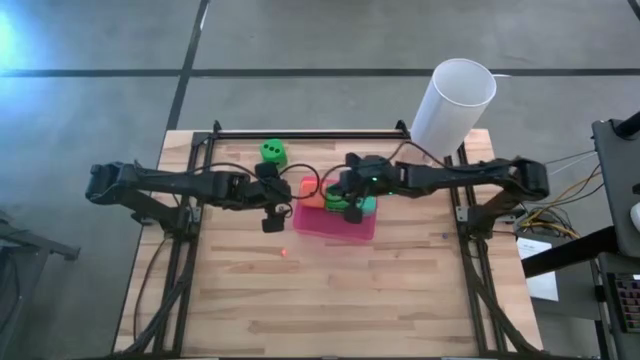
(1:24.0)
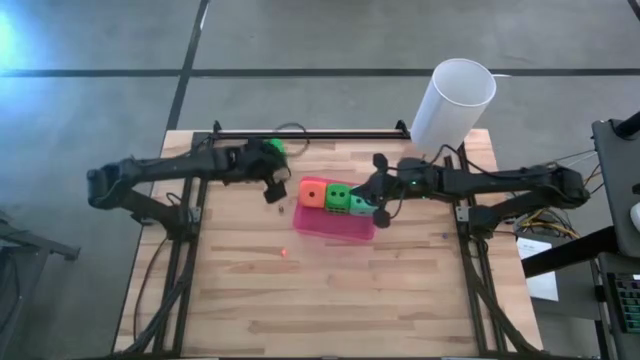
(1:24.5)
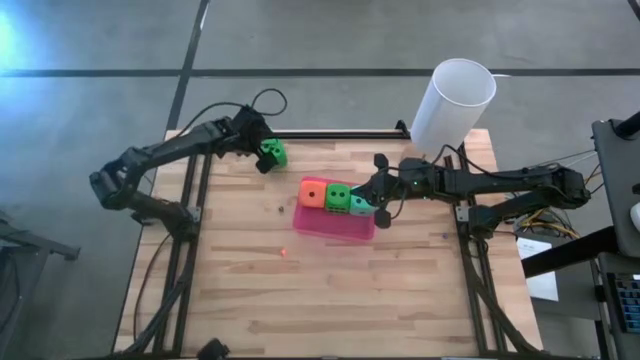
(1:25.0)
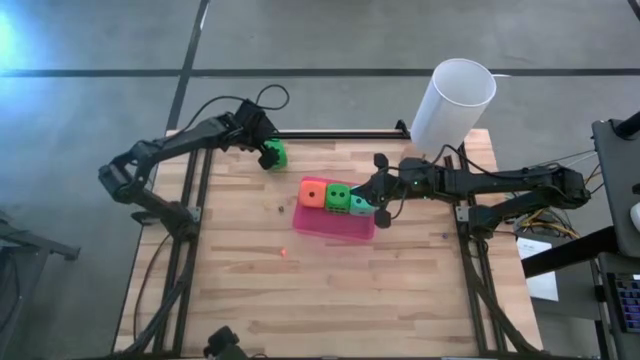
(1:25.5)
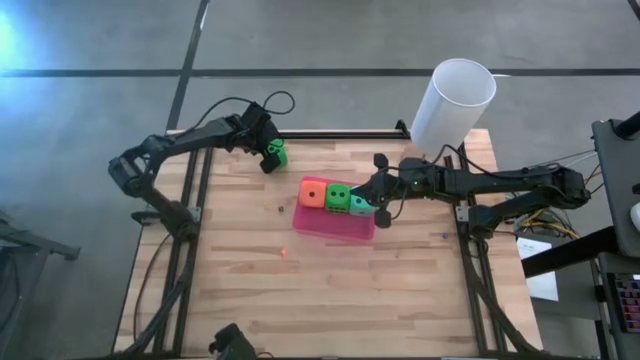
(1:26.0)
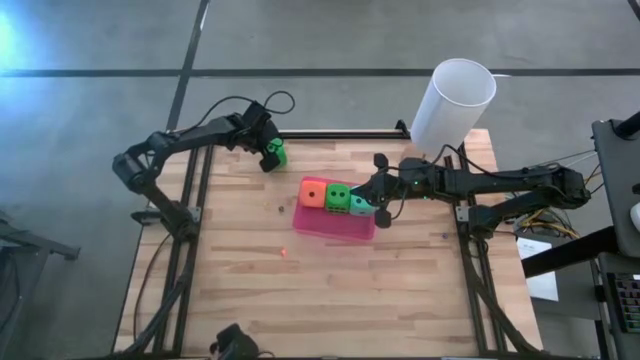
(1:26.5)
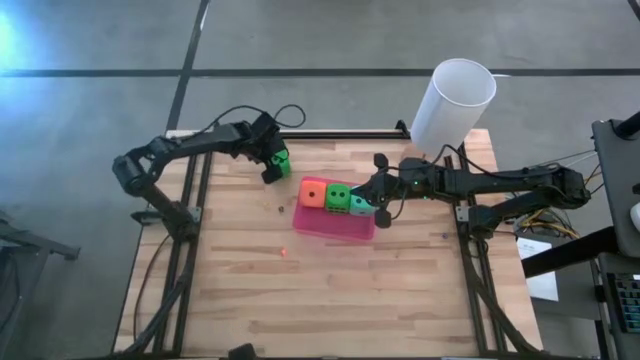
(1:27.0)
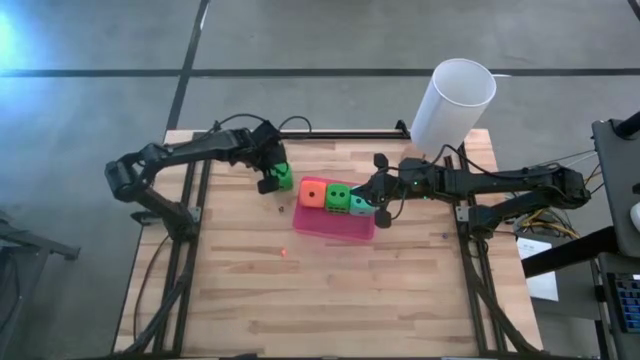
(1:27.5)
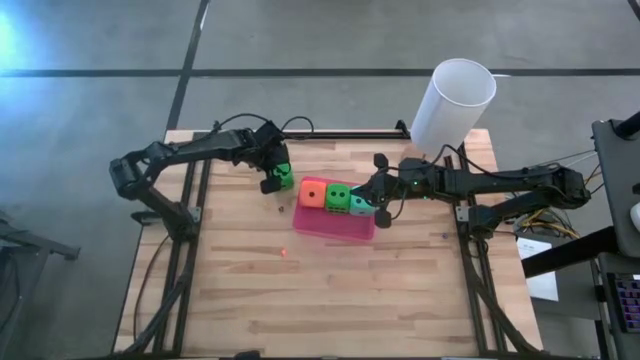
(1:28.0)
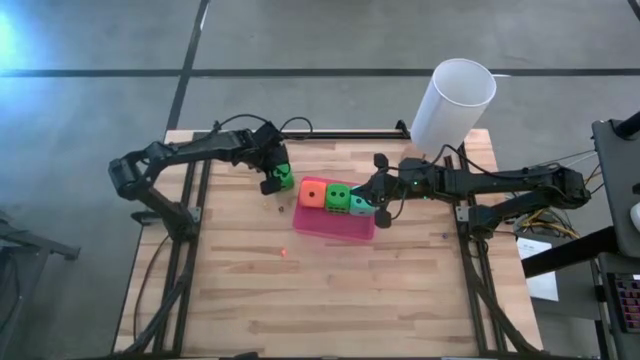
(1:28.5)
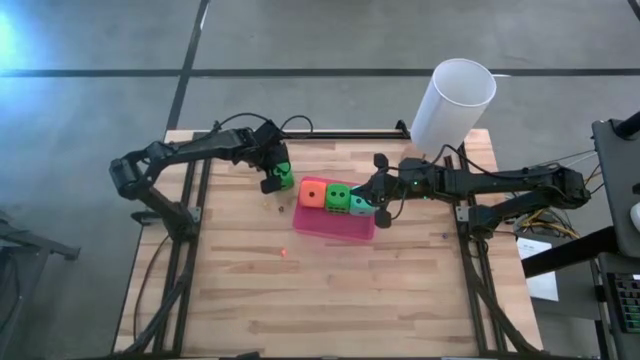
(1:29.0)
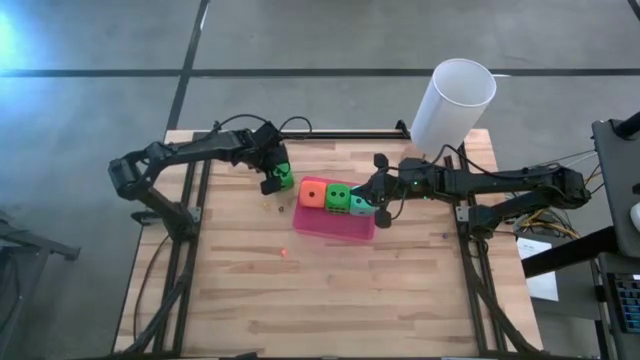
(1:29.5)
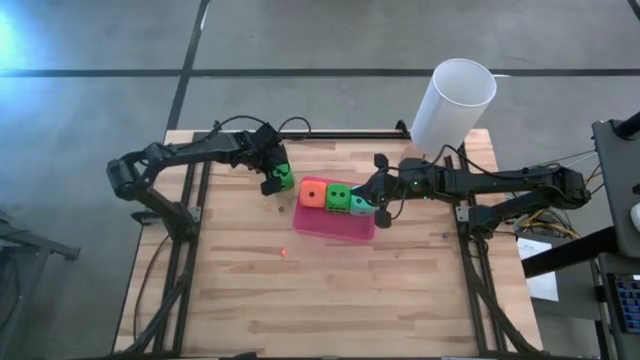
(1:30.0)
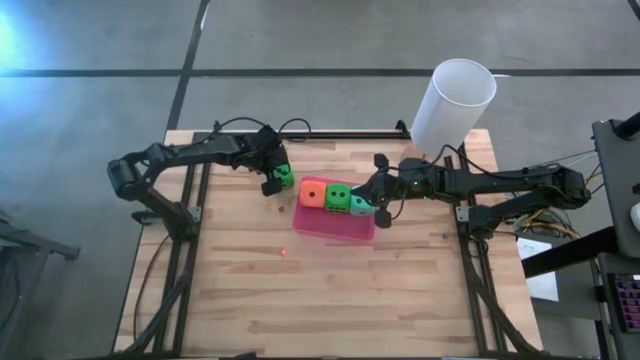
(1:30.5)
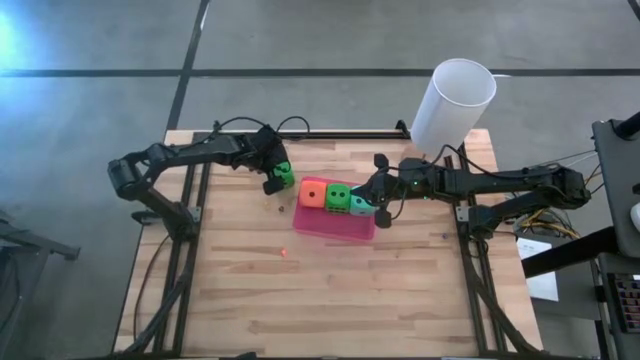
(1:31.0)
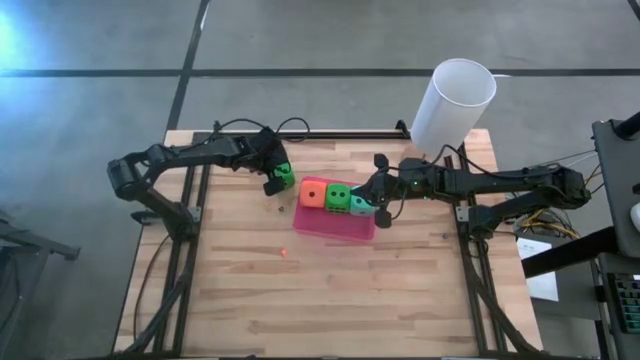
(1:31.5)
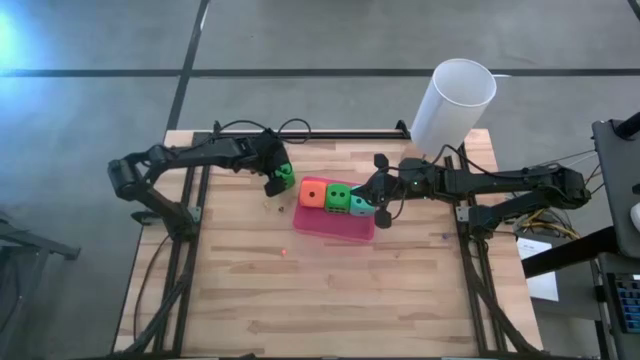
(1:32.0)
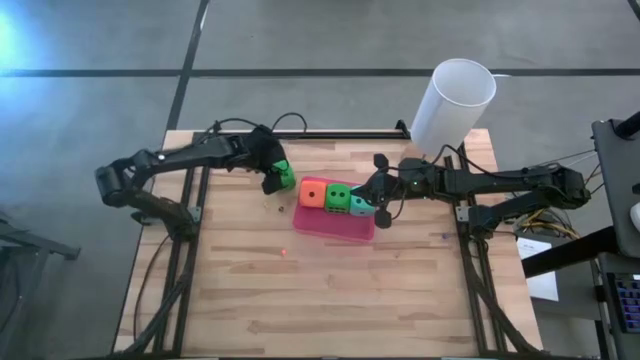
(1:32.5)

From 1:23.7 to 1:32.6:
Task: Pick & Place Dice
Put the large green die into the pink bin

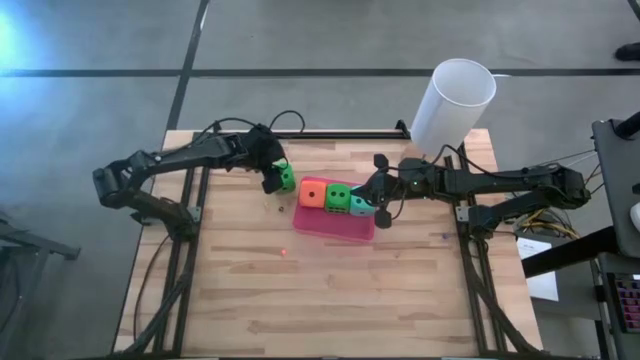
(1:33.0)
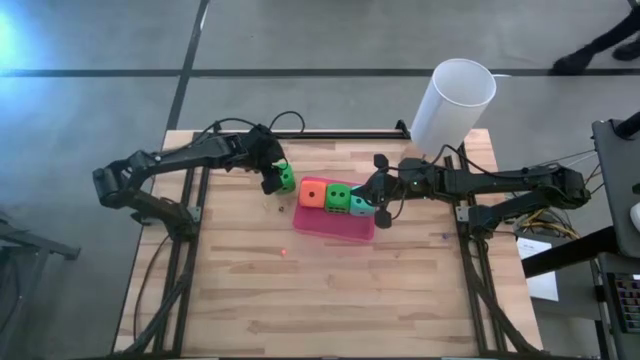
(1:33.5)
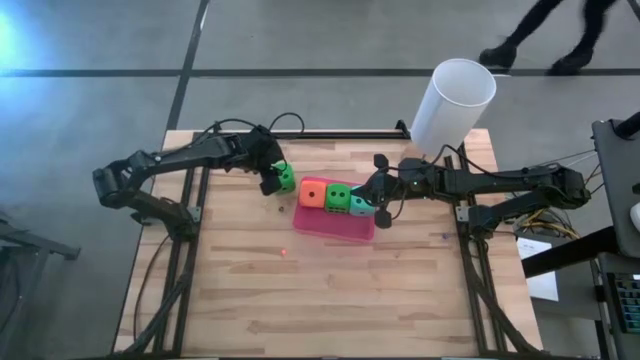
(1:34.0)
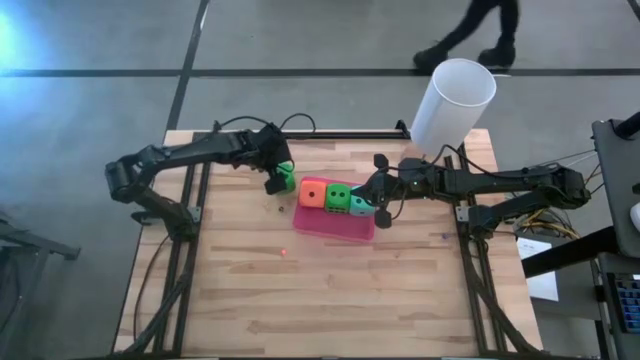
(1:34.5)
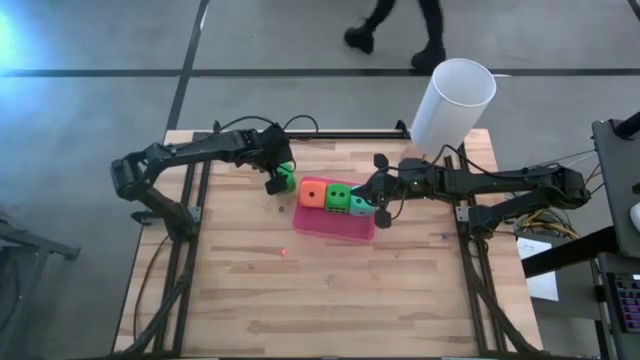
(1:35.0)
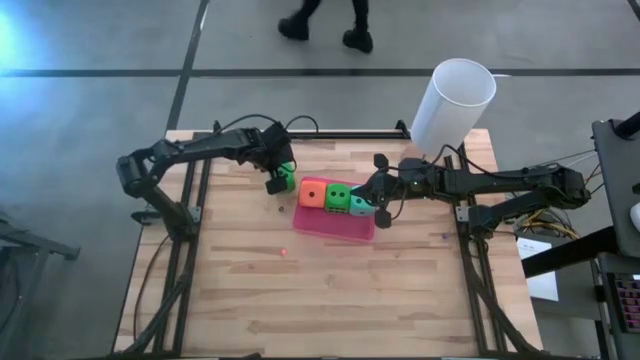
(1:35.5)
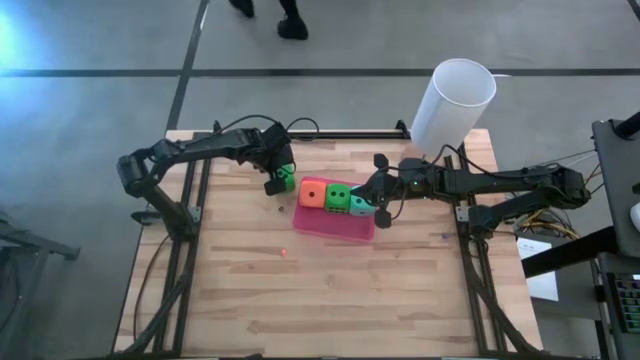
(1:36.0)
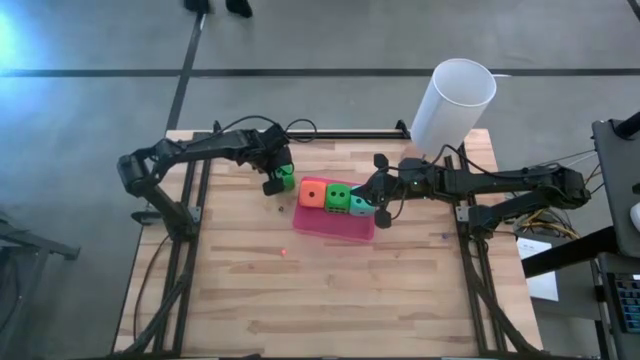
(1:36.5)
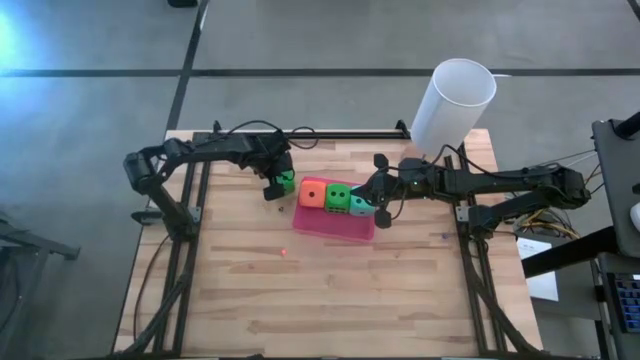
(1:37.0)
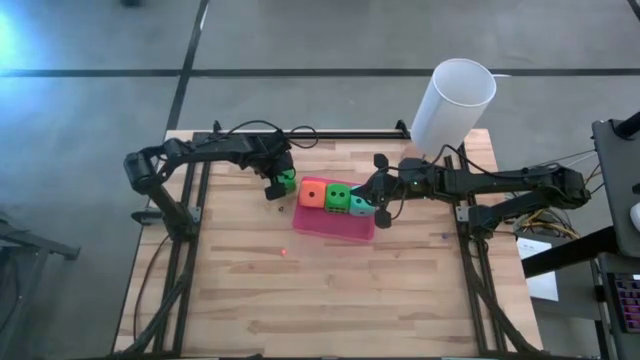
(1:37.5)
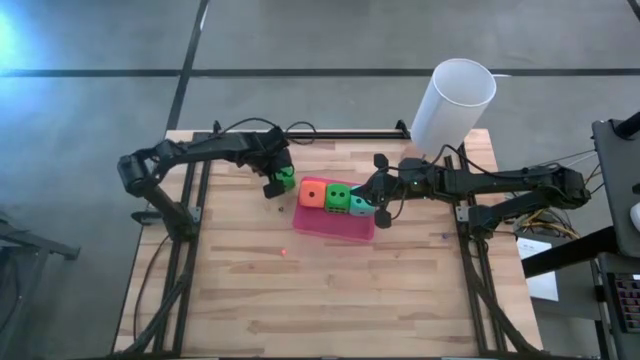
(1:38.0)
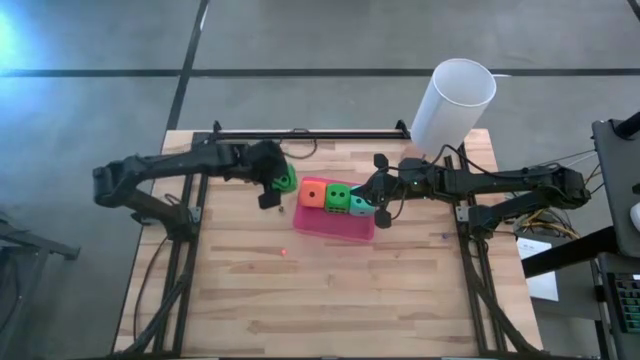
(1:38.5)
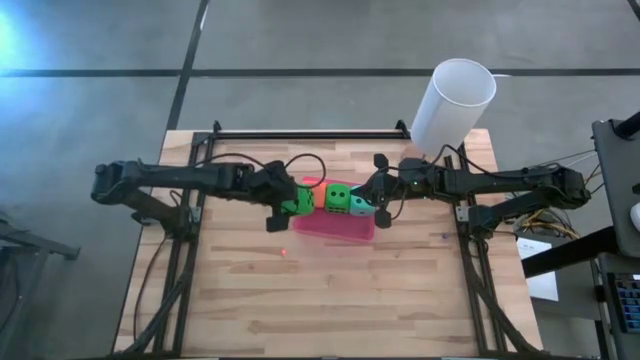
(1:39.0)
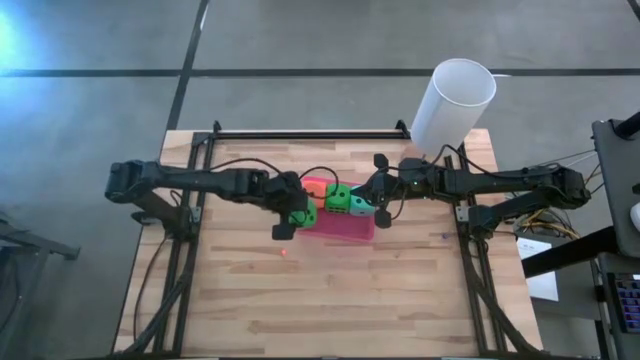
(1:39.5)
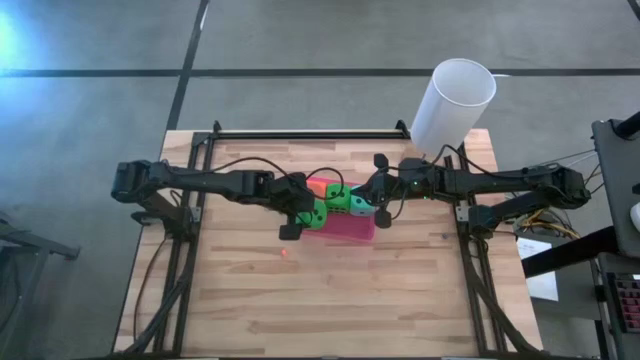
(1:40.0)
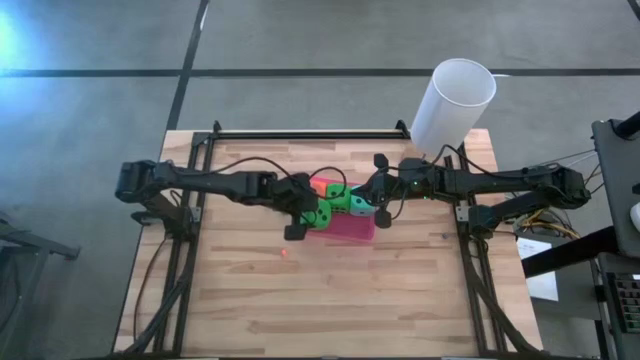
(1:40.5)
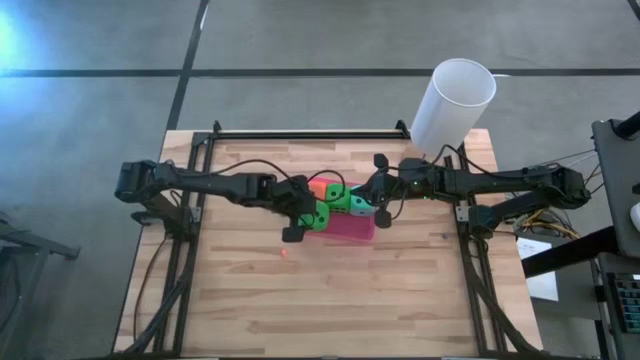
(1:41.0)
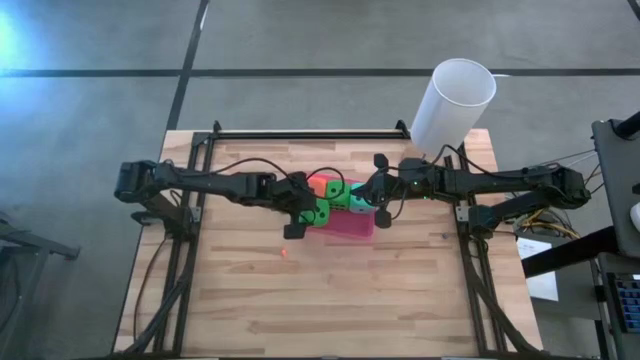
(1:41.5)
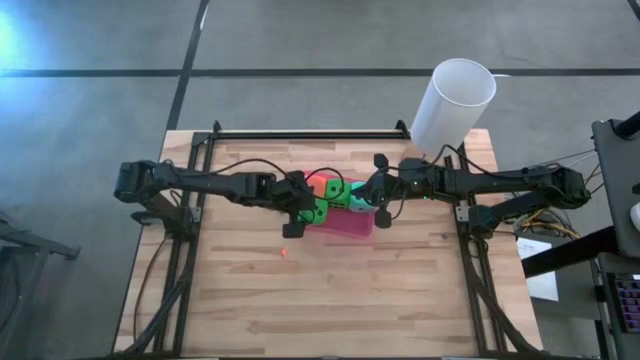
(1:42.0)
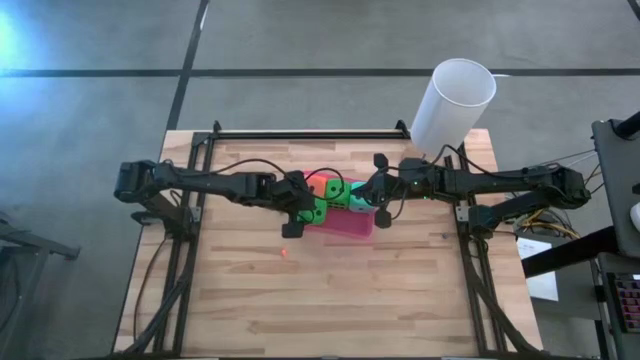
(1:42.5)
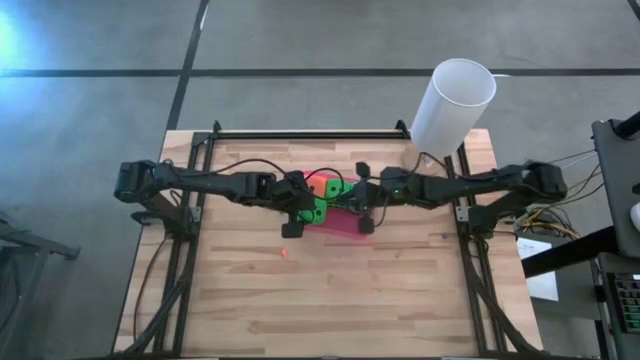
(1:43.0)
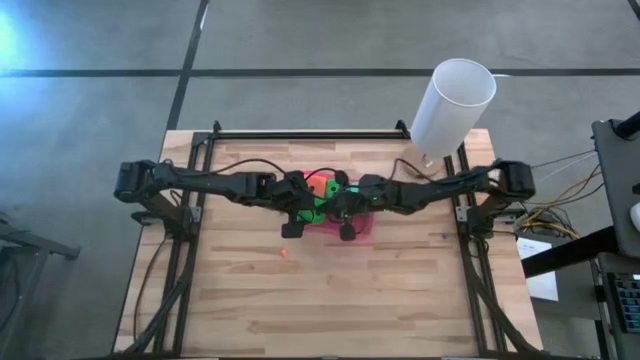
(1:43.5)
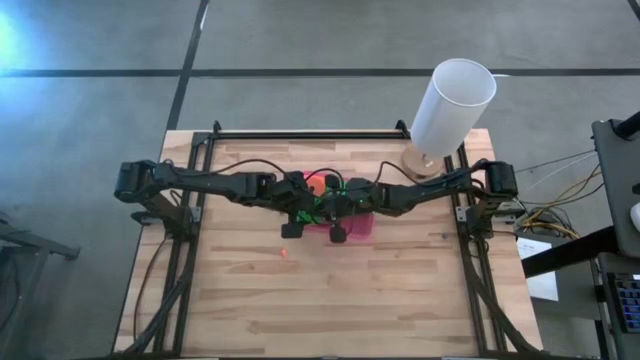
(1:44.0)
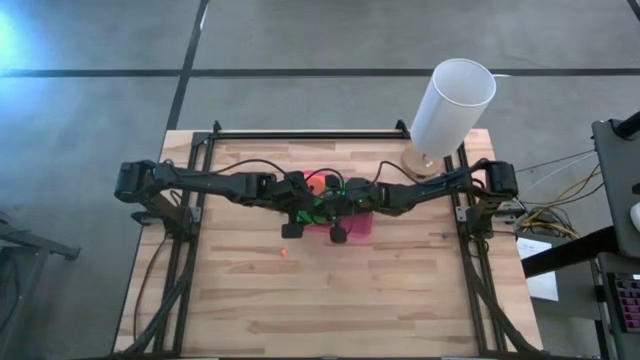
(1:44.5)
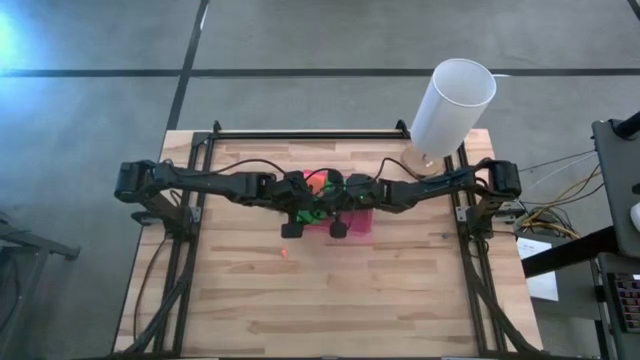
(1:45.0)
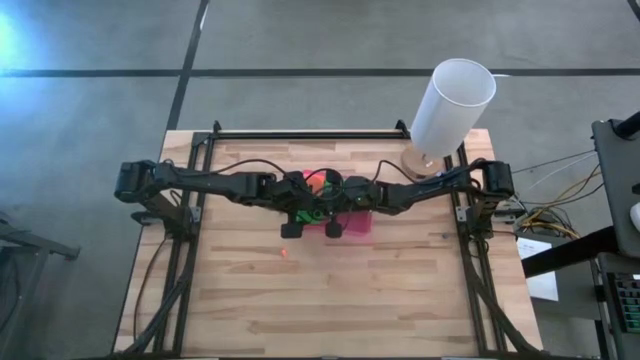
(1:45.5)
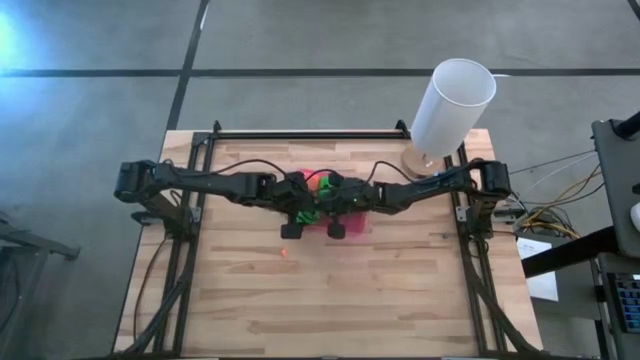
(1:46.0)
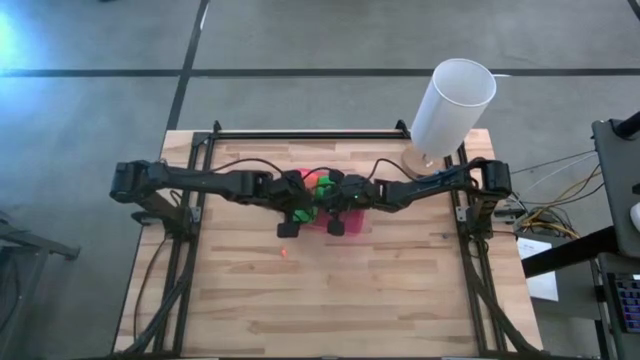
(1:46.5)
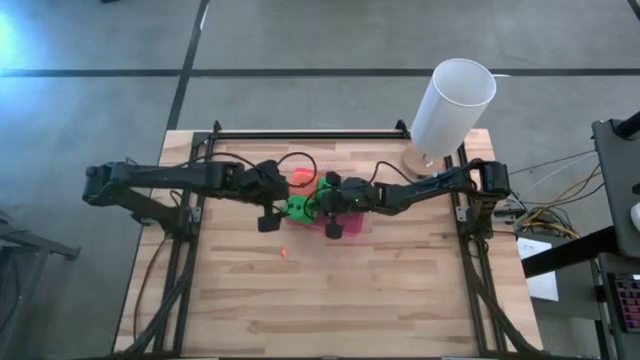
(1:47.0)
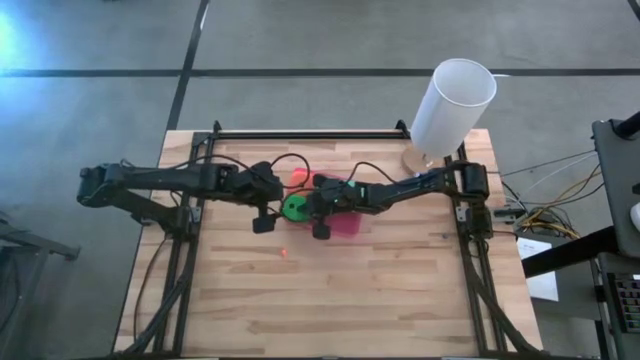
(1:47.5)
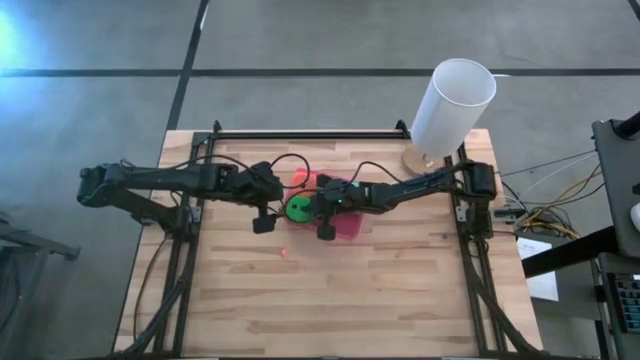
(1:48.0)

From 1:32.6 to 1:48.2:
Put the green die into the pink bin
